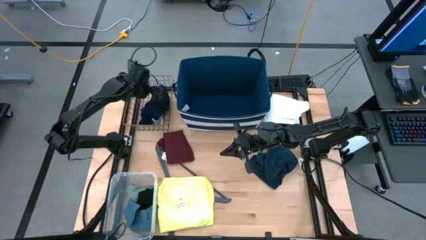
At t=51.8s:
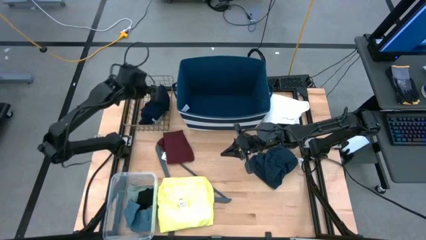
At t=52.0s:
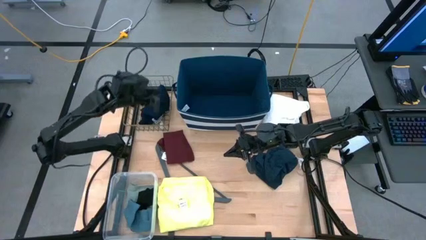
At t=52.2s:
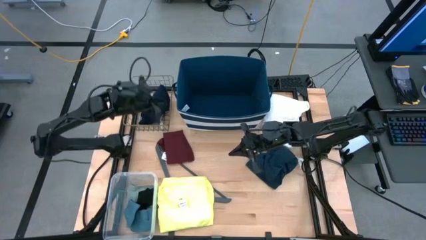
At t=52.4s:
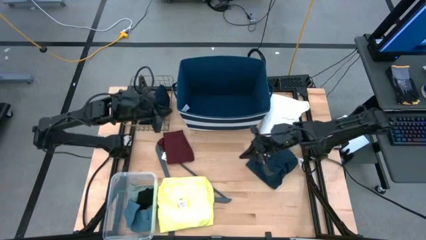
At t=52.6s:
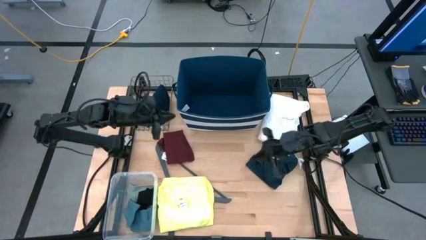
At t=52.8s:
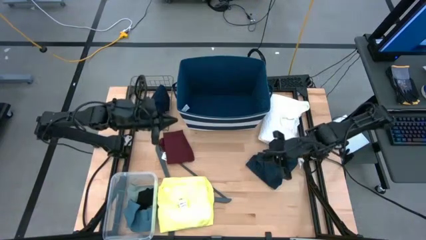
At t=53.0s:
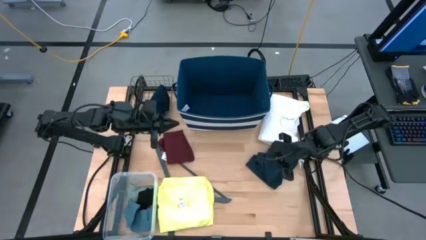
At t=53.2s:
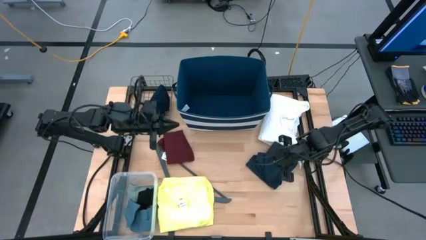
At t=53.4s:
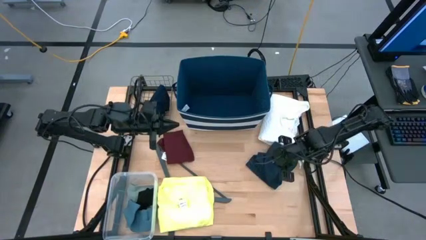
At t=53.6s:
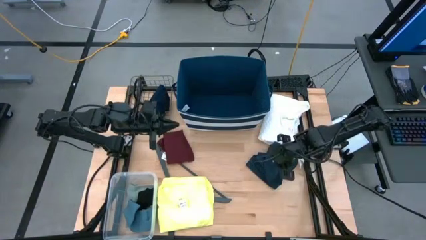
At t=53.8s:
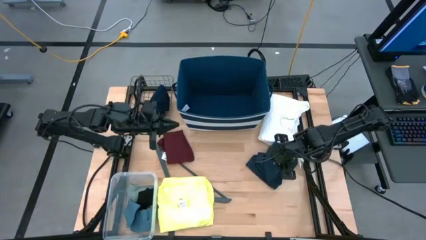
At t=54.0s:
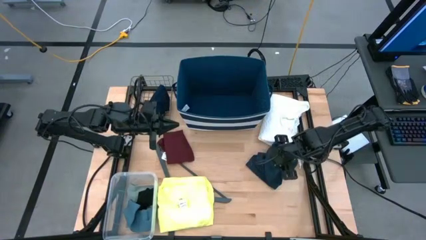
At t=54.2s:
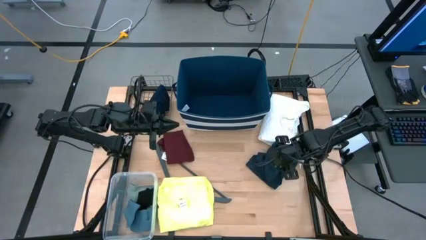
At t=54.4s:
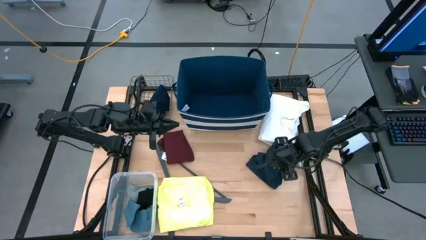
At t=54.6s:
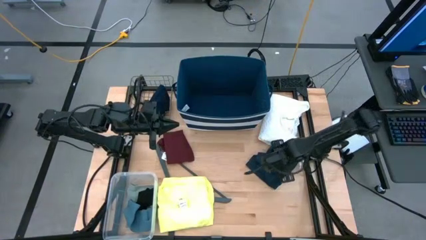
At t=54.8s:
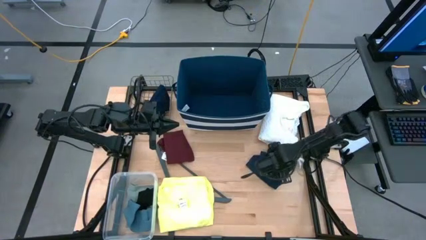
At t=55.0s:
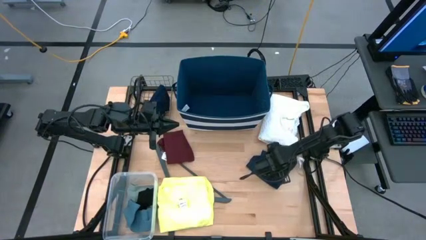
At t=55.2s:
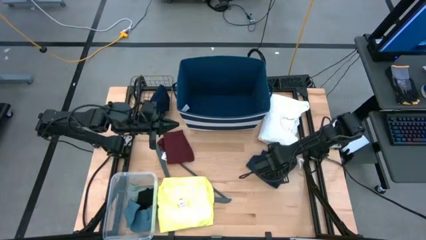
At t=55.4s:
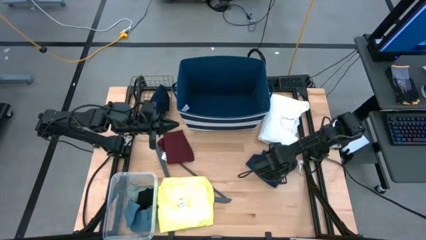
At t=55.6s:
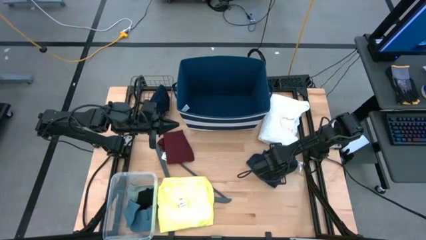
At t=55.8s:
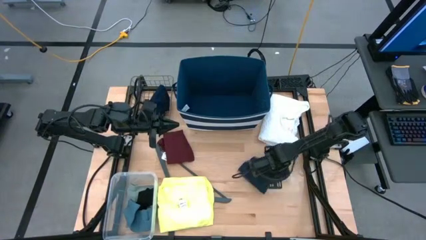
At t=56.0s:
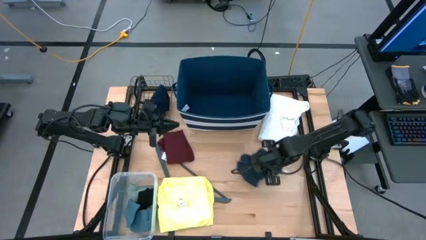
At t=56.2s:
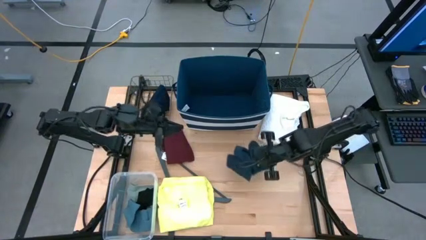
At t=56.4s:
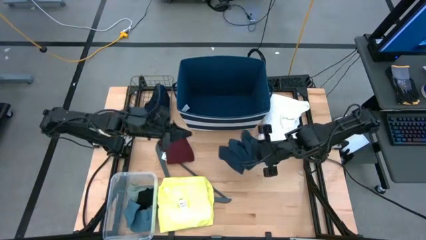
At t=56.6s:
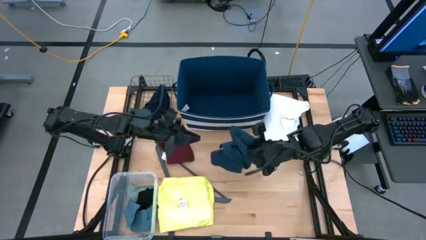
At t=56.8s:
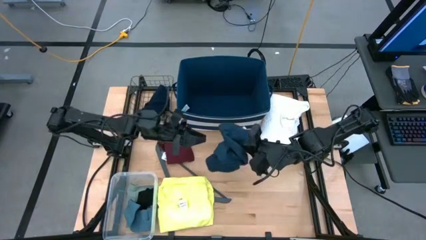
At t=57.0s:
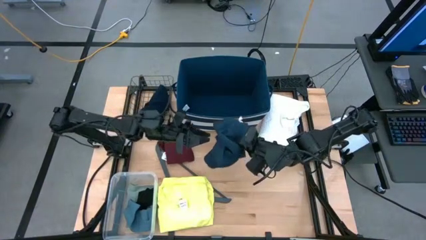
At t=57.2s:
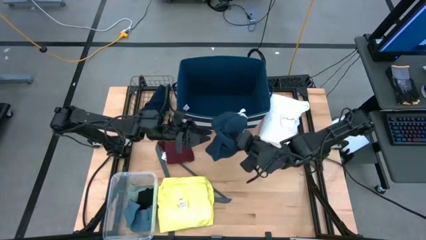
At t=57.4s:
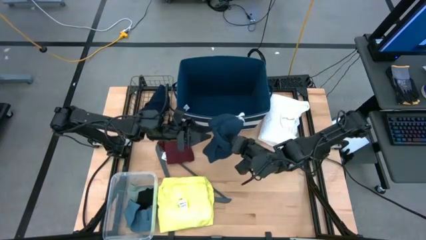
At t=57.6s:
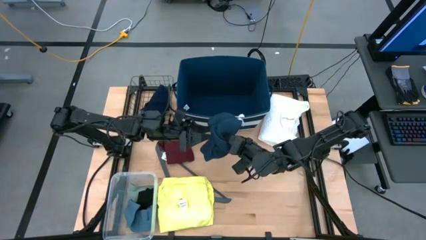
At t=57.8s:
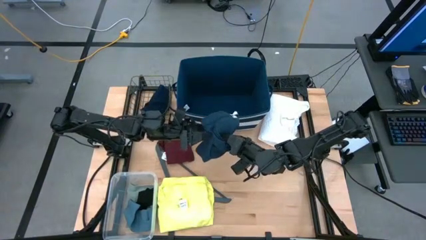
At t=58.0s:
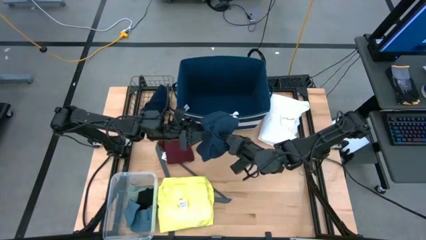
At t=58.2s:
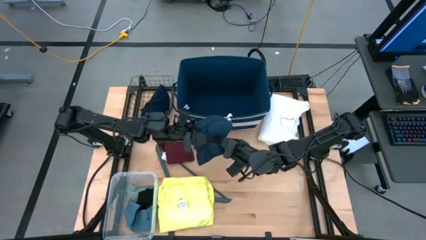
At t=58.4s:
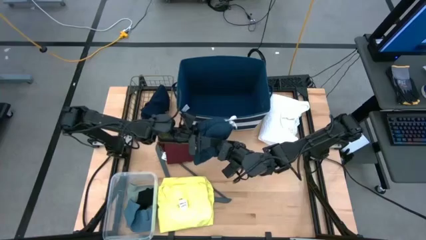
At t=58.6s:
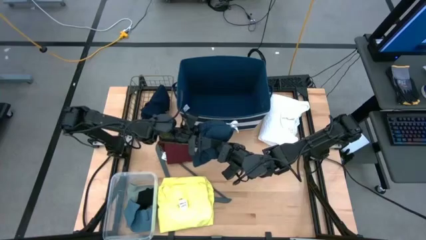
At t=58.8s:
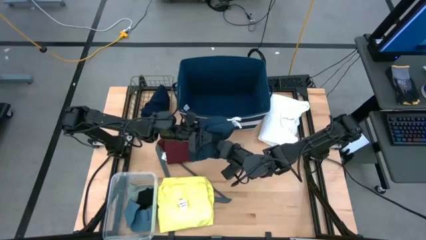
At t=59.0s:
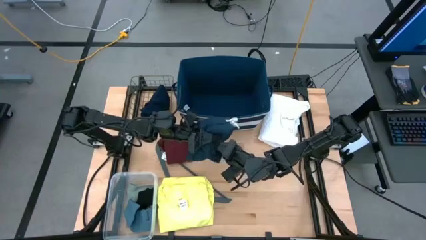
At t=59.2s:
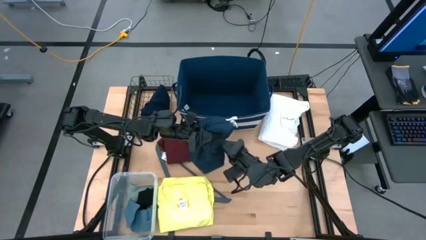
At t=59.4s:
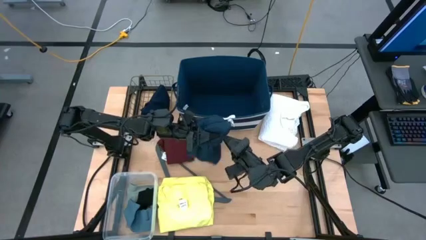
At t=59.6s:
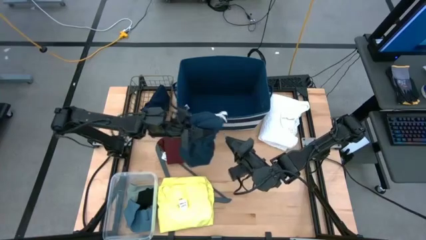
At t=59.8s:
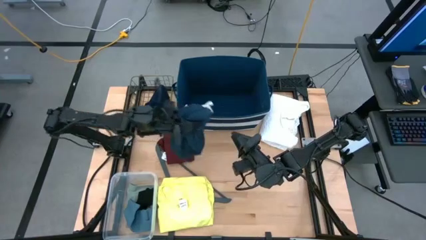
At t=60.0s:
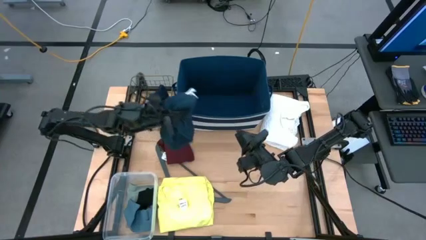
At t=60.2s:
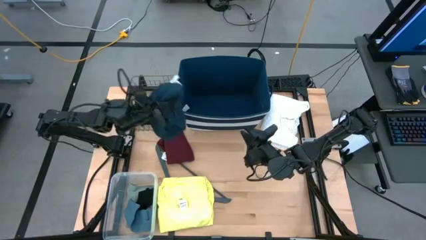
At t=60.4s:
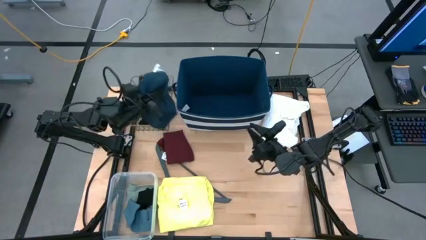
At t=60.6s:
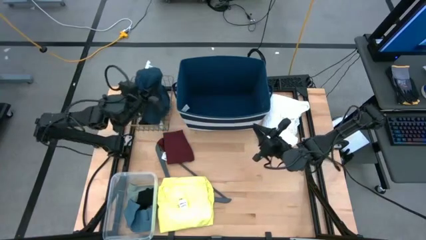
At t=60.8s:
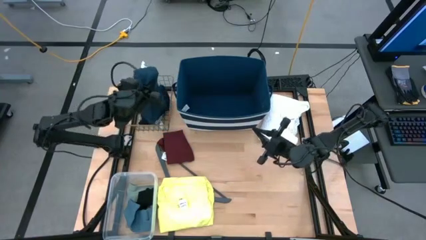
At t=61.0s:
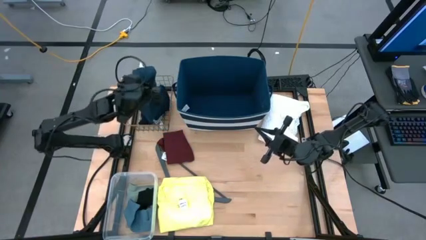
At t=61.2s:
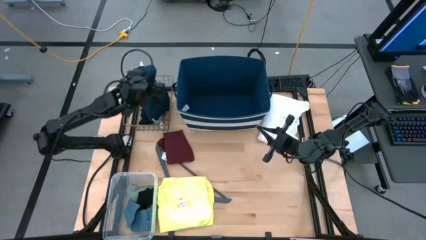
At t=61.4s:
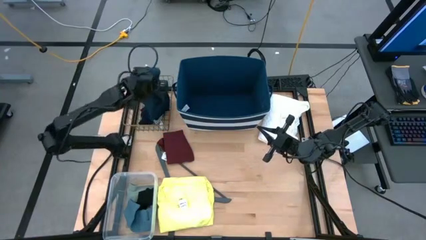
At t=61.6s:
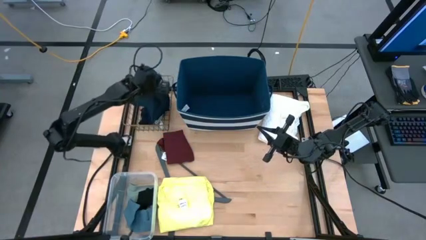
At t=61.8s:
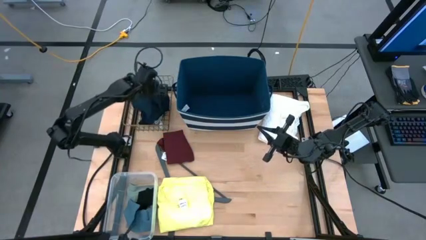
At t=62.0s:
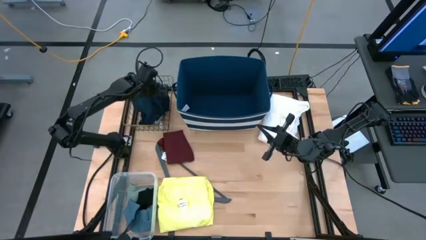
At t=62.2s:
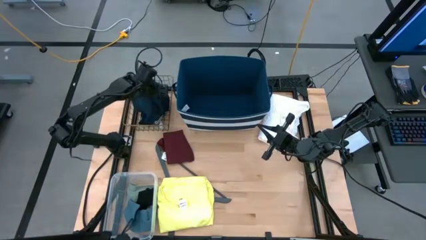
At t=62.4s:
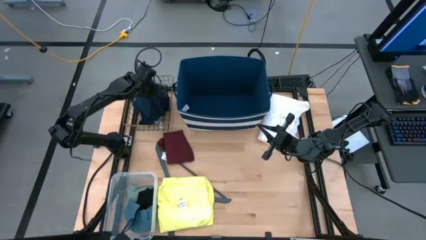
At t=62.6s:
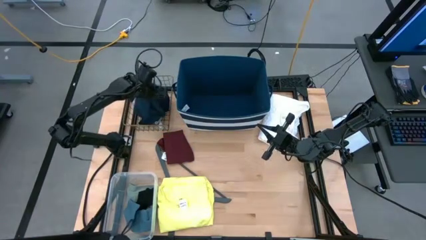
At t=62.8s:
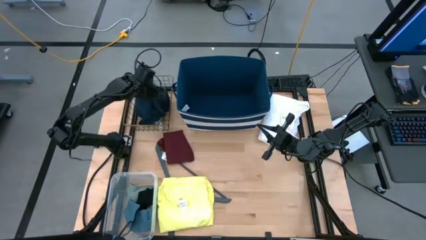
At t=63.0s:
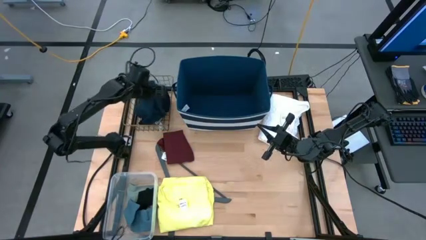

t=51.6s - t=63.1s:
Task: Pick & Place Cloths
Put the blue shorts into the wire basket

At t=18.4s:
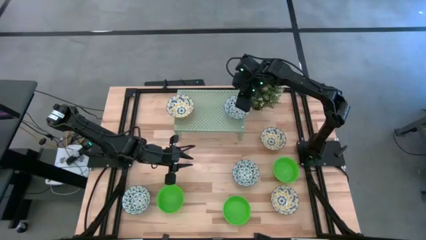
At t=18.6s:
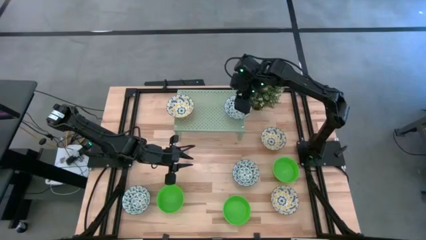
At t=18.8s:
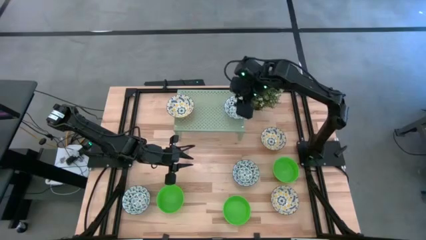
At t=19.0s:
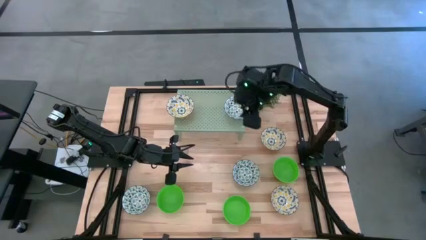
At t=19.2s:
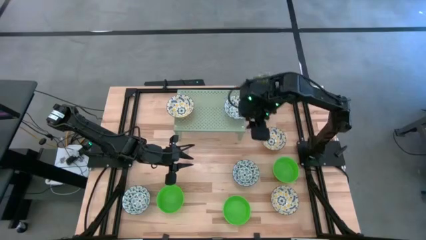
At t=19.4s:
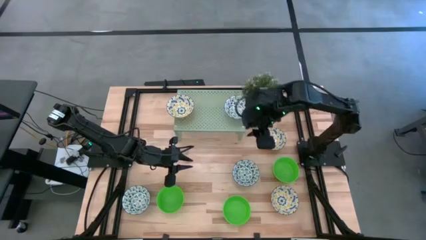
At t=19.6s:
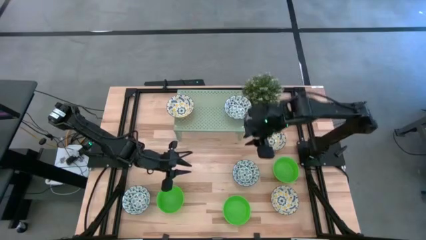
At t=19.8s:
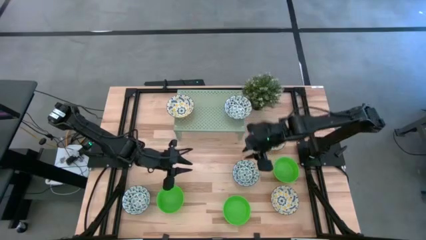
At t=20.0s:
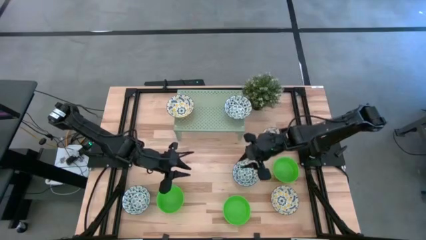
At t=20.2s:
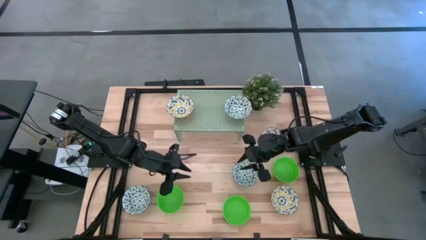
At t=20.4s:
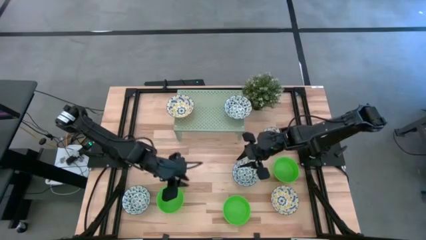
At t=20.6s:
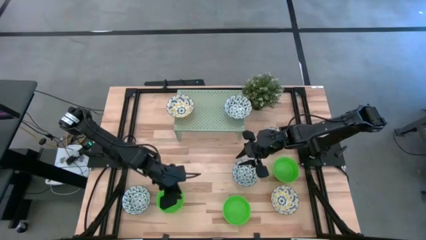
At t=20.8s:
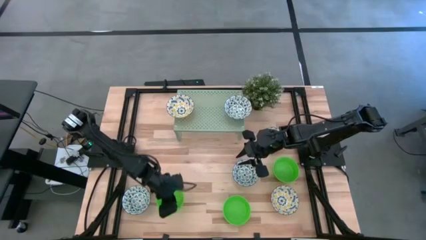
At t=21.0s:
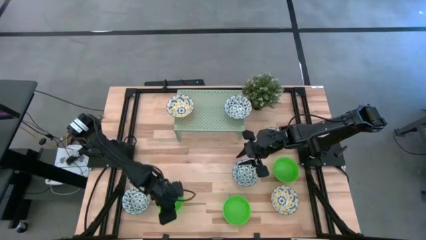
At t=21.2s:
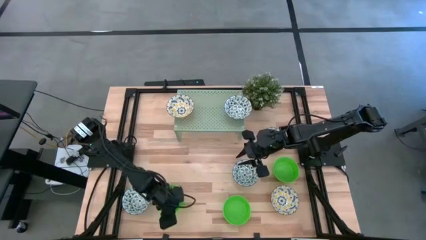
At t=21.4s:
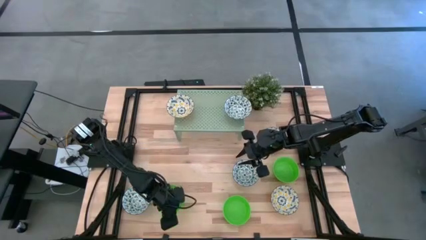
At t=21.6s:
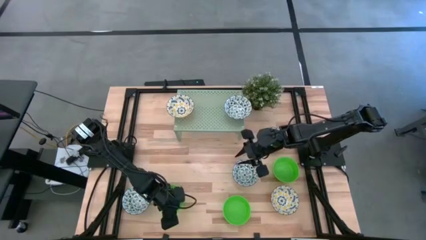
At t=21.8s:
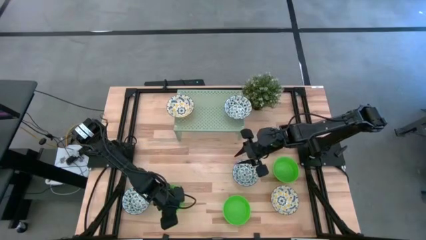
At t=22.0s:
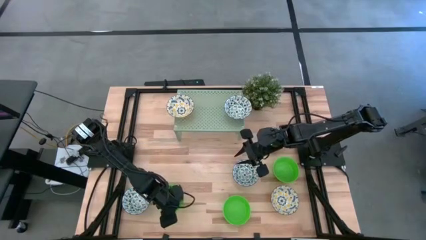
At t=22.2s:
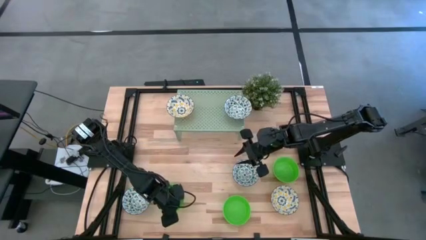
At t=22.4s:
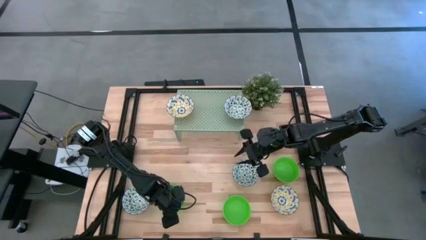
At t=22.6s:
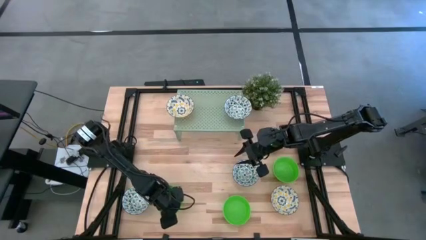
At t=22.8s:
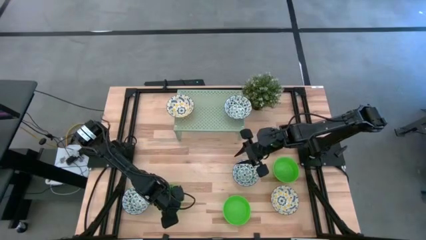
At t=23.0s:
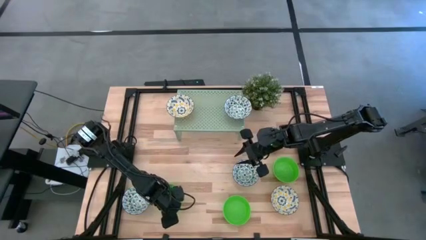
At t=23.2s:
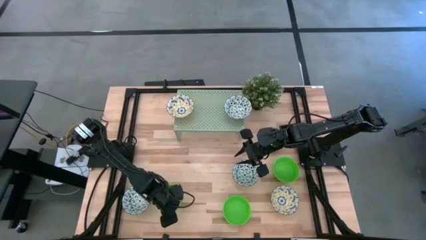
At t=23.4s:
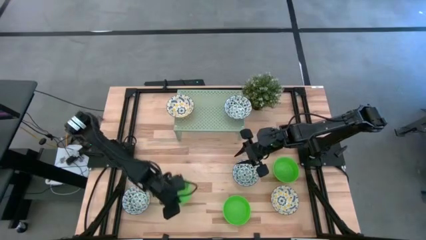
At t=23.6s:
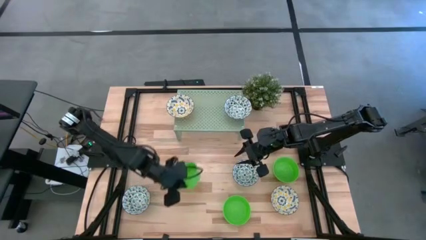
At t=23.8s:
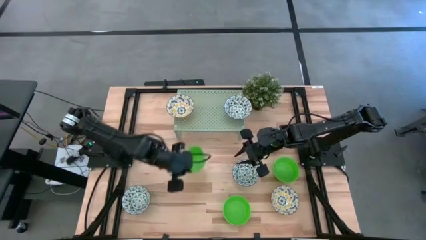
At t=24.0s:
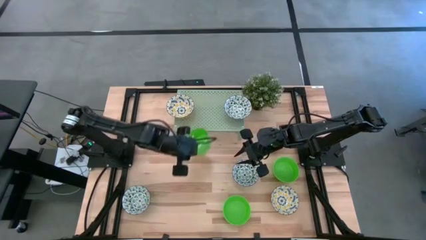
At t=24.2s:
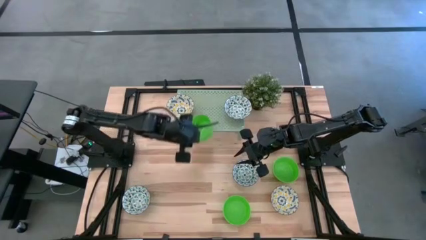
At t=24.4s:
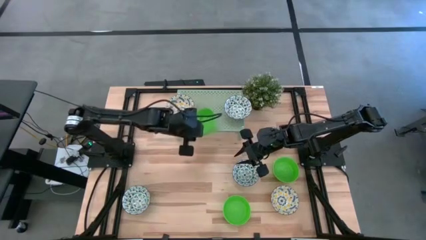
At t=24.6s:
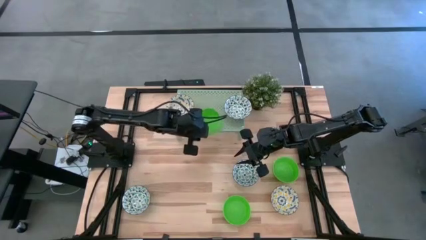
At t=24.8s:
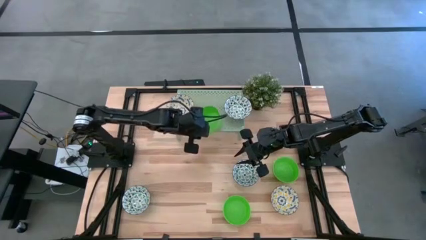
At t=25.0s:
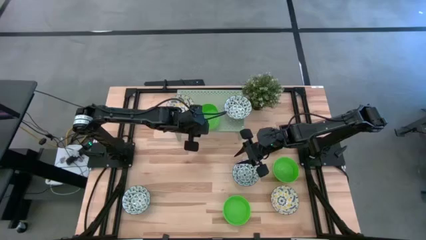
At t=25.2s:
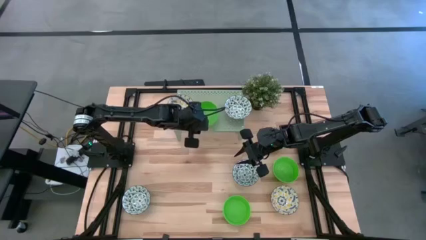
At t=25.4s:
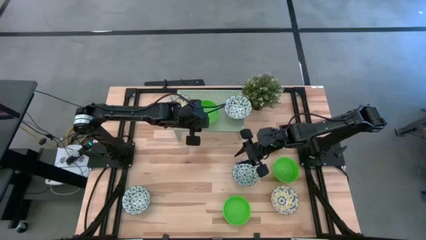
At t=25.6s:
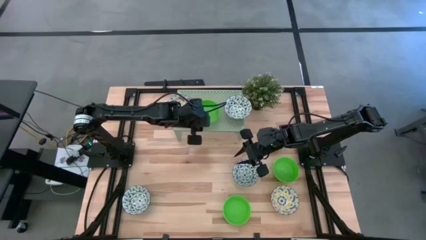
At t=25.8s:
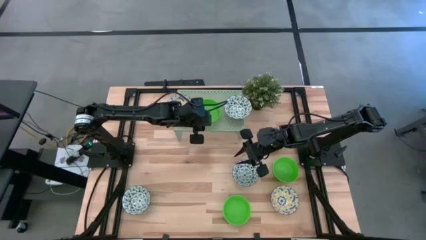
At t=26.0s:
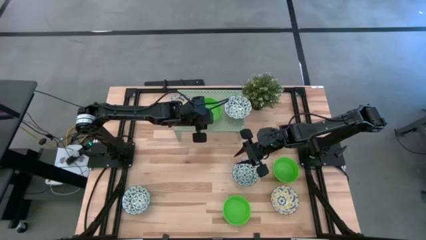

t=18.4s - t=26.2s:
Task: Pick & Place Mini bowls
Put the left green bowl on the shelf
